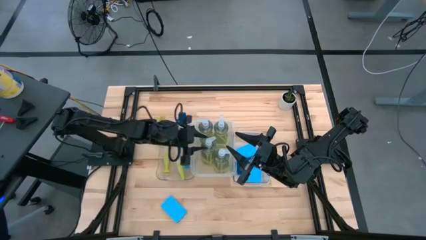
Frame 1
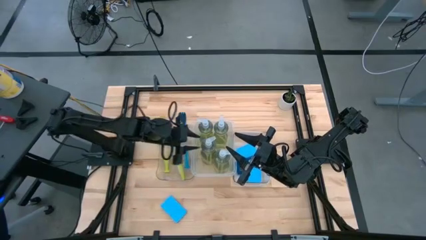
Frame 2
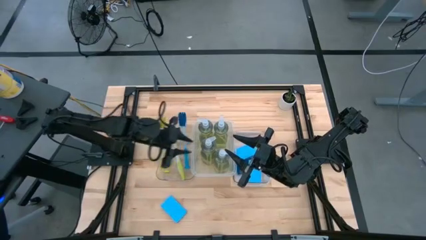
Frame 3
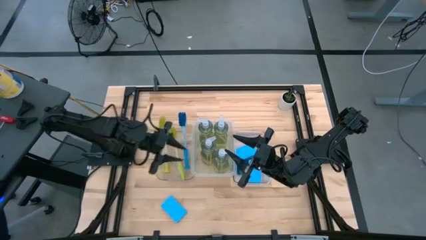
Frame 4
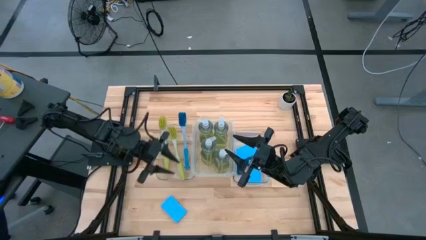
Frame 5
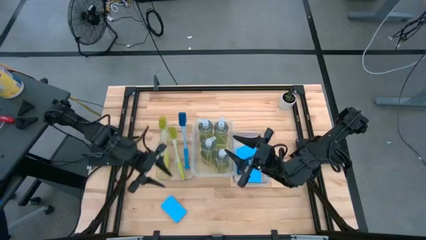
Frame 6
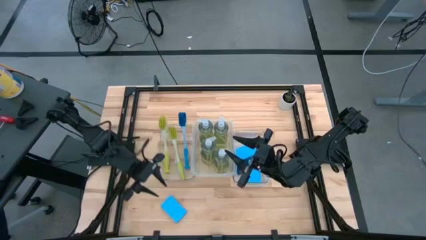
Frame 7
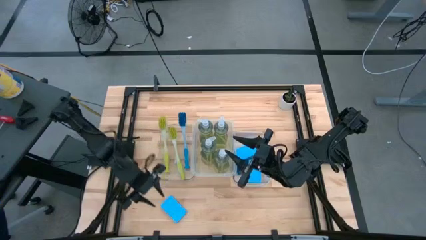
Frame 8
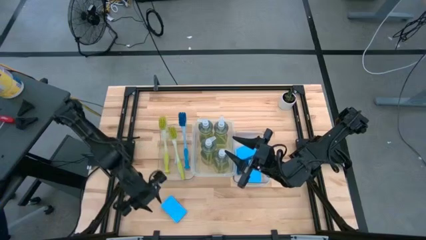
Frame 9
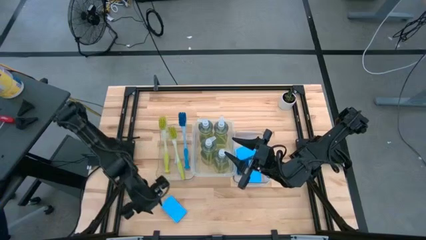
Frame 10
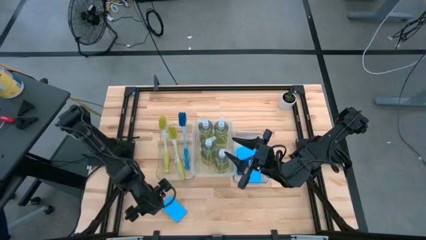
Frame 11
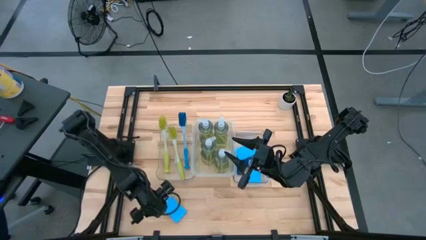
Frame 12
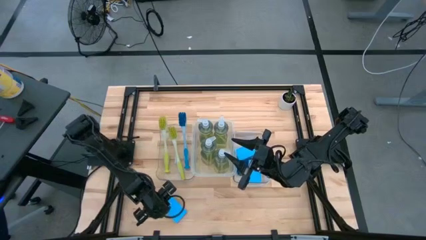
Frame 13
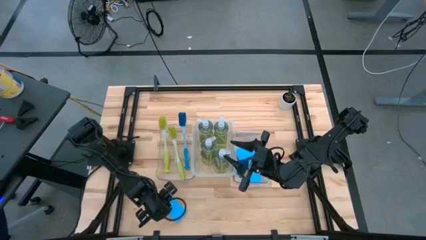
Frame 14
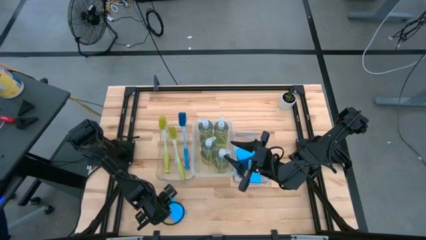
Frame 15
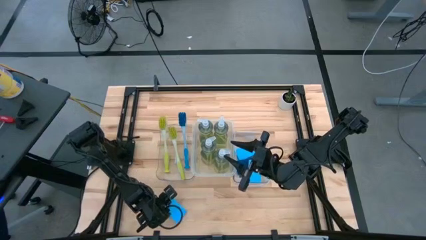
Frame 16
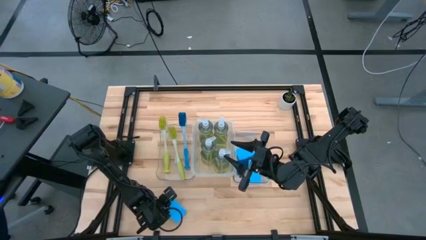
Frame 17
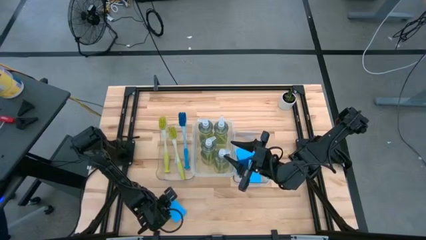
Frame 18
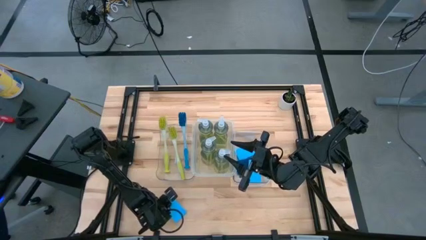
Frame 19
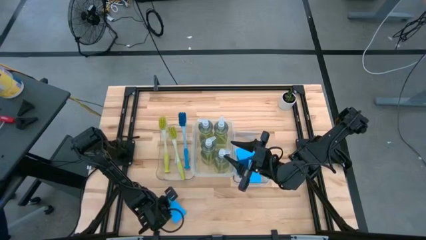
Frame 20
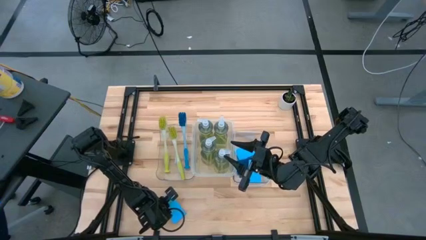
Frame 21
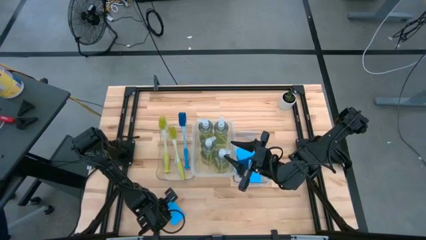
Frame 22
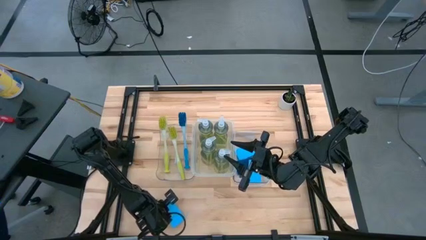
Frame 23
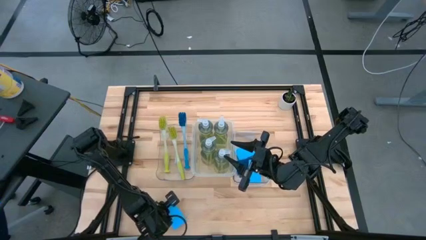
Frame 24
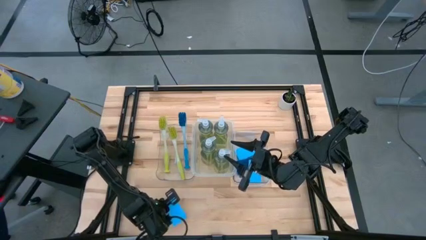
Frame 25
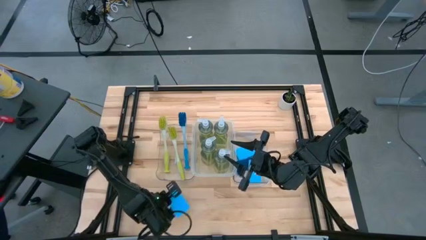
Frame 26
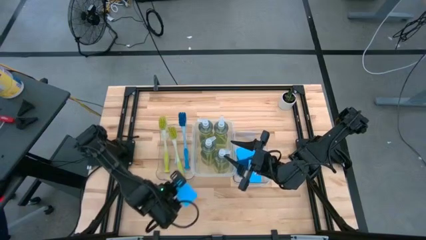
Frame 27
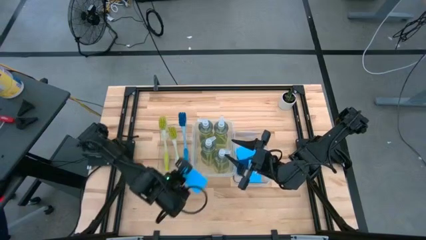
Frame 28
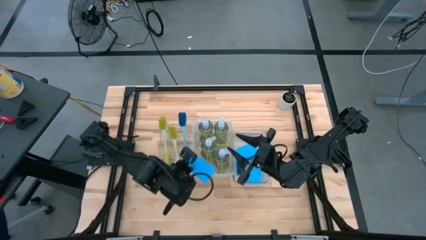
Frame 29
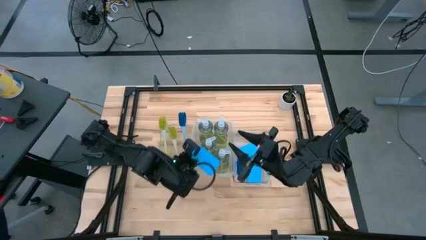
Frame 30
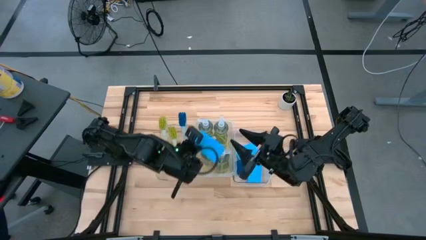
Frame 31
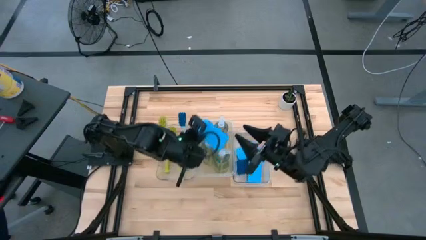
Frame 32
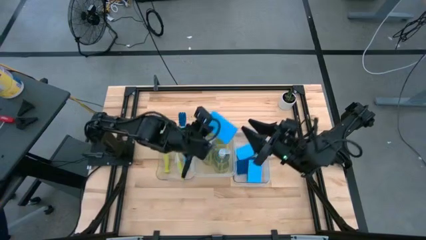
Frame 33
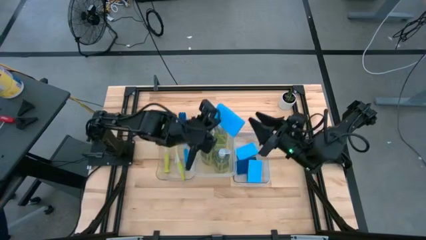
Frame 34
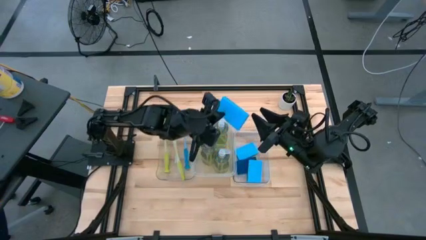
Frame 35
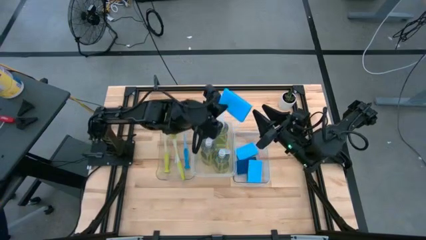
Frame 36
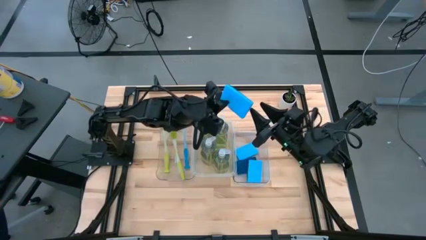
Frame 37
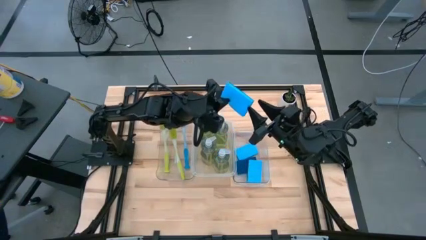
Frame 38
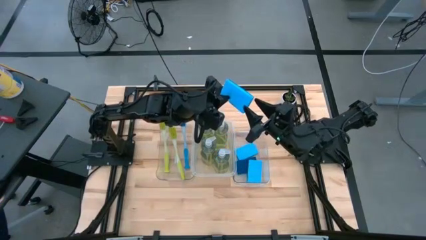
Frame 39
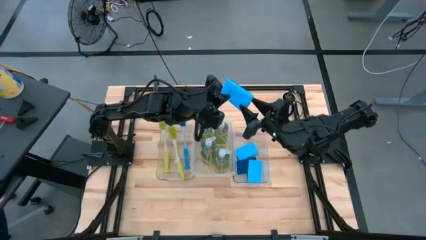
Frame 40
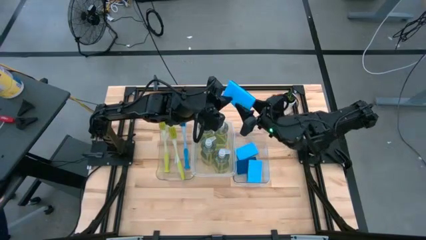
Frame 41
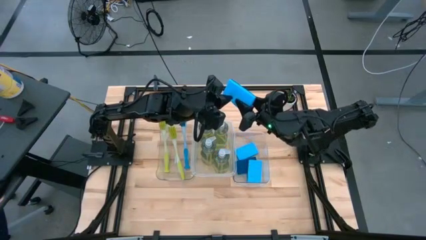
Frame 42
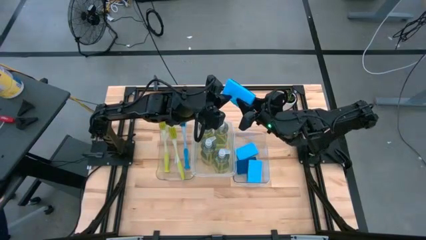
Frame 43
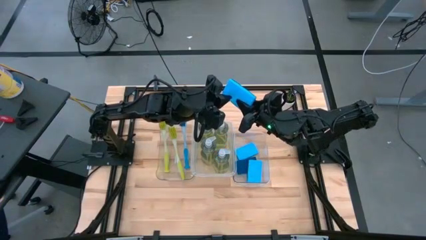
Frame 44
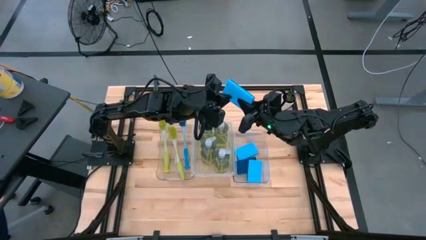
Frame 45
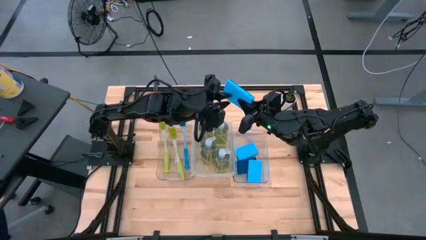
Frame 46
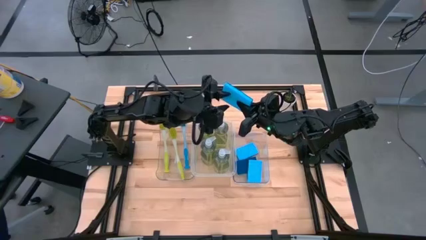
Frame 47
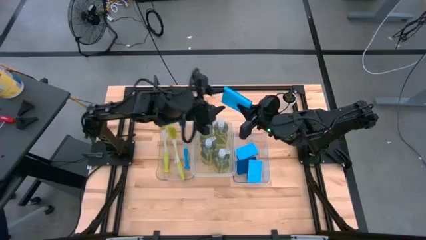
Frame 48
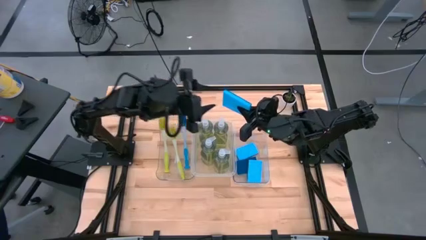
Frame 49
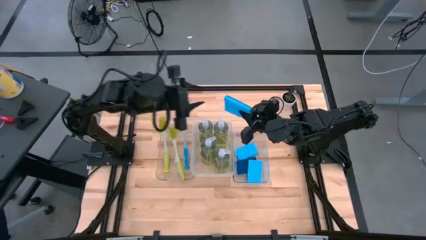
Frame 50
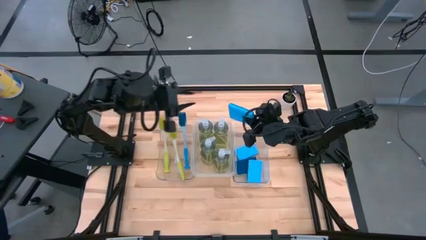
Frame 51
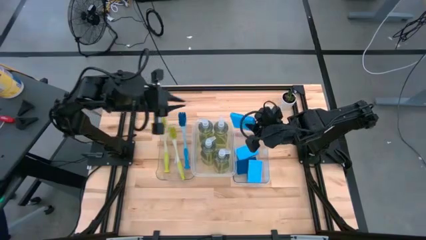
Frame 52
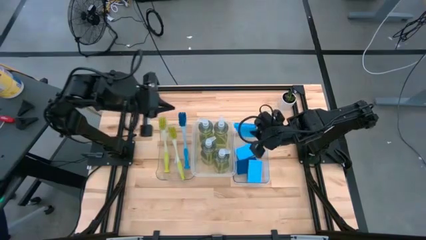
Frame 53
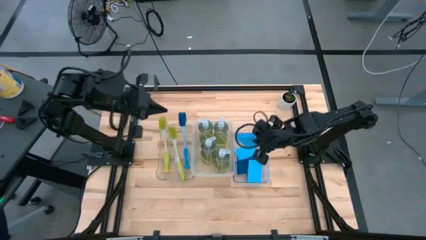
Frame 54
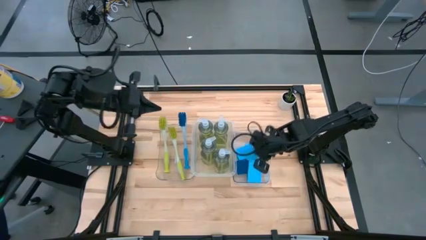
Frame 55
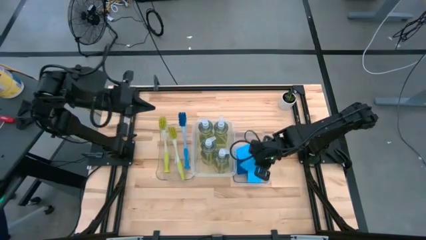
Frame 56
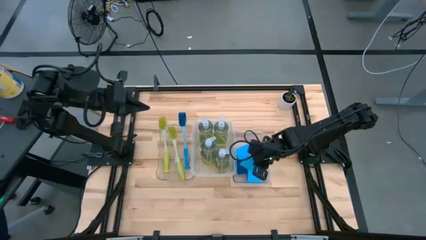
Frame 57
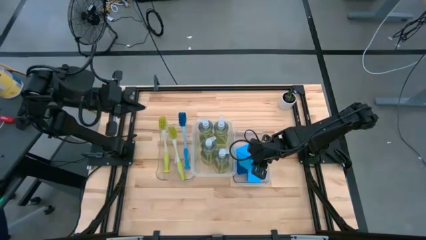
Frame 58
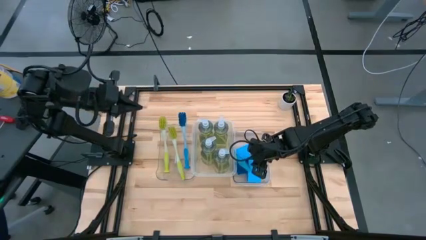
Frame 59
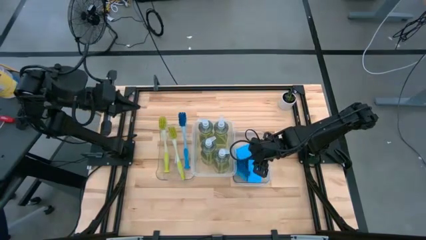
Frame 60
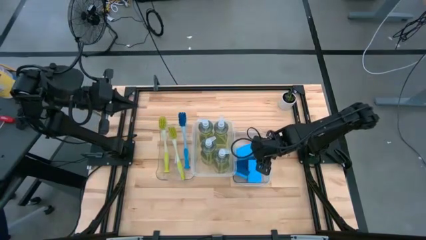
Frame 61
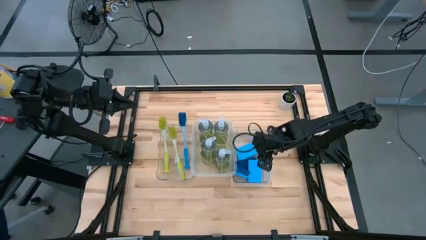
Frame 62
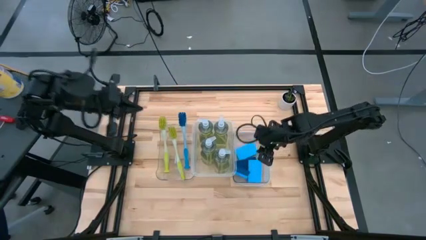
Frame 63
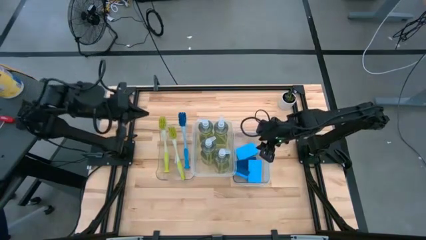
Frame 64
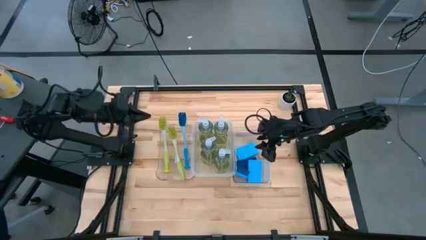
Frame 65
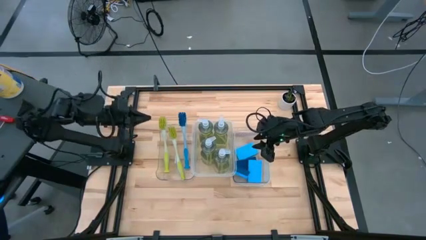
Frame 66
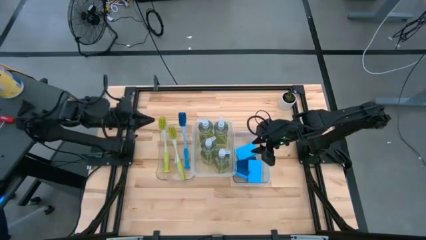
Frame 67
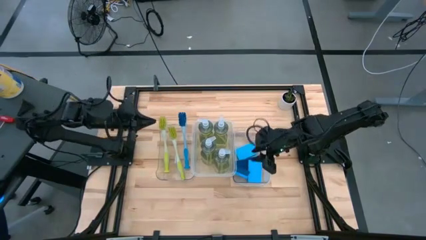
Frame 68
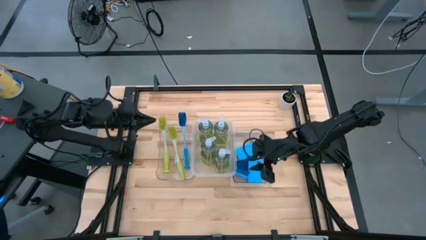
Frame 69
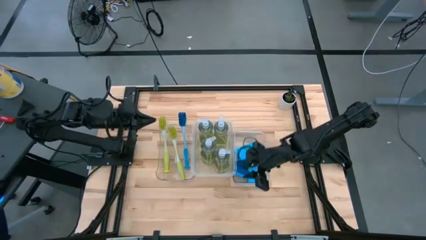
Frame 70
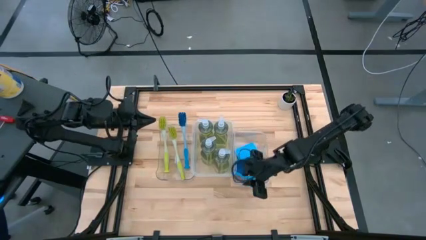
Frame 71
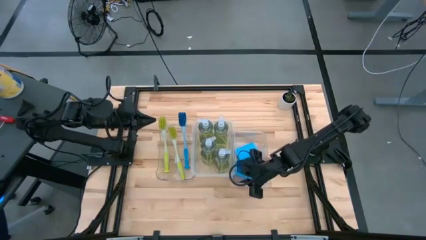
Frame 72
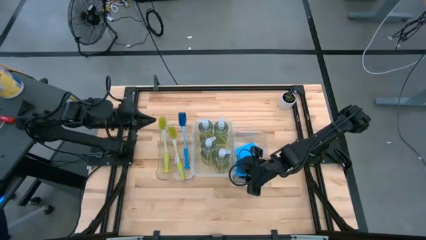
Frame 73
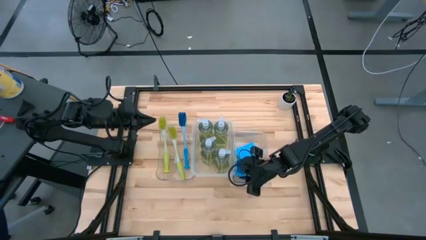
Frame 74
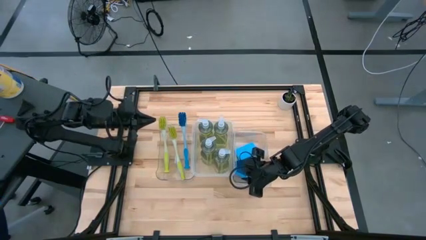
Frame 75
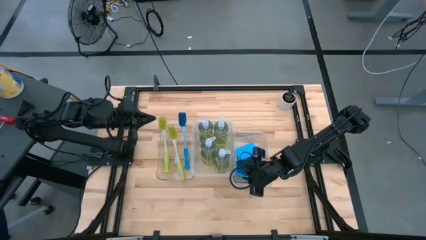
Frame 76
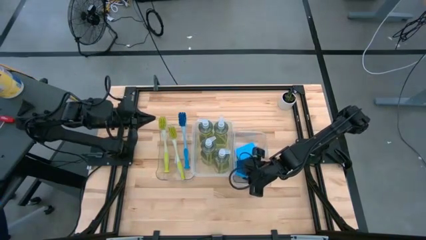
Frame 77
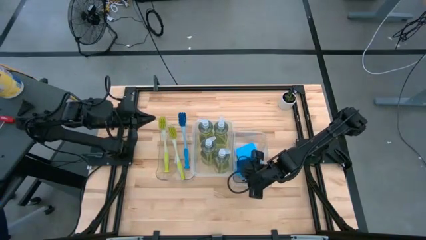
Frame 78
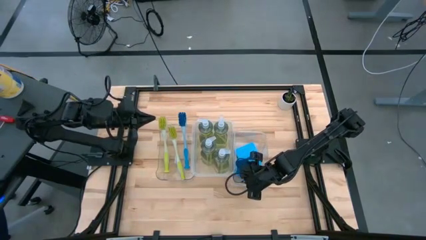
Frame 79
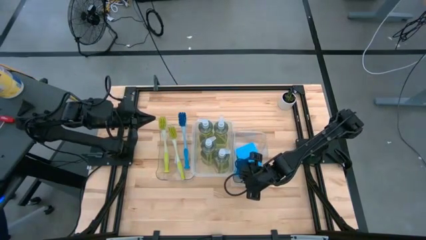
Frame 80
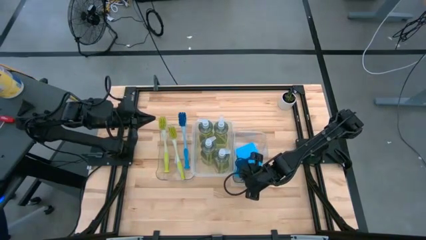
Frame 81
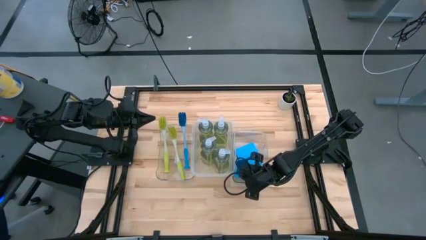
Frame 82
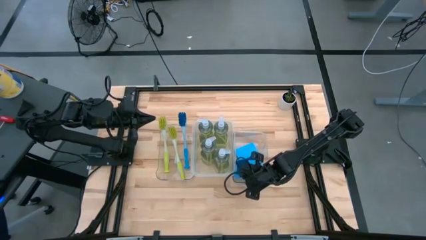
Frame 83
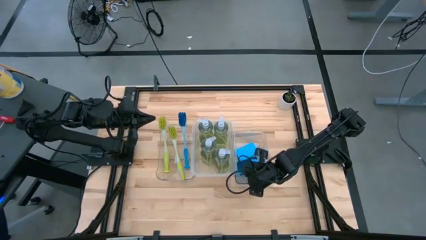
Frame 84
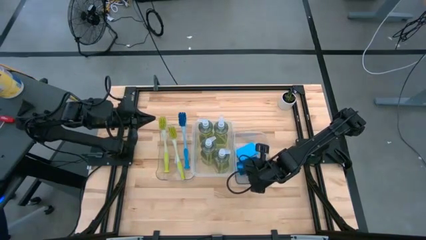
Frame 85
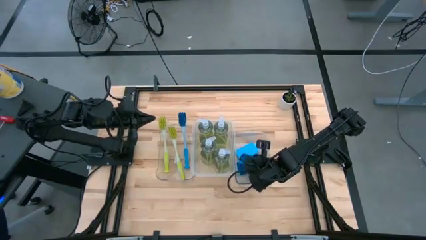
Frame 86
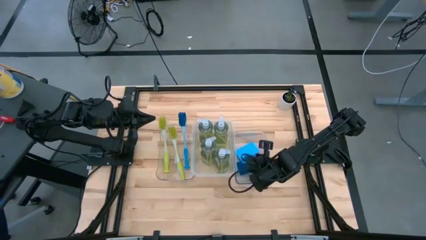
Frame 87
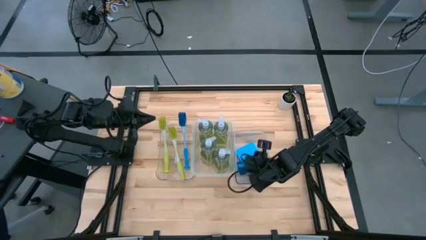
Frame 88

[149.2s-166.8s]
Task: Pick & Place Kitchen Sink Supplies
Put the blue sponge wipe into the right transparent bin
